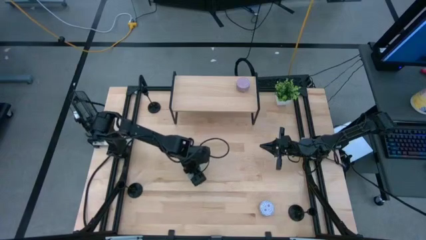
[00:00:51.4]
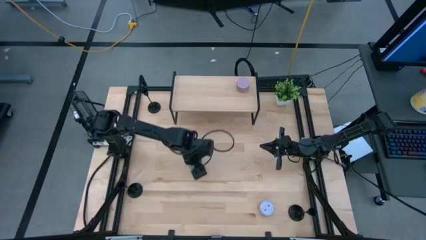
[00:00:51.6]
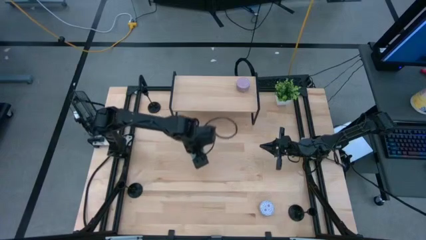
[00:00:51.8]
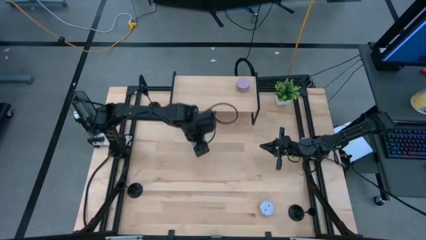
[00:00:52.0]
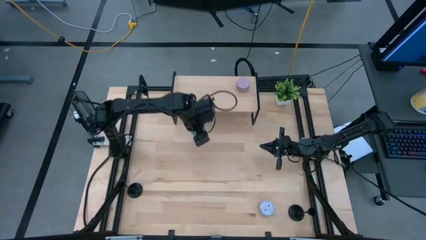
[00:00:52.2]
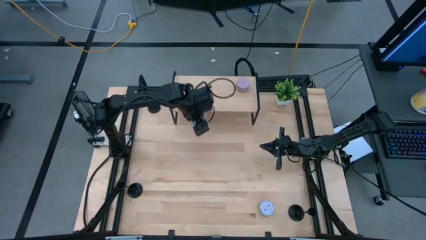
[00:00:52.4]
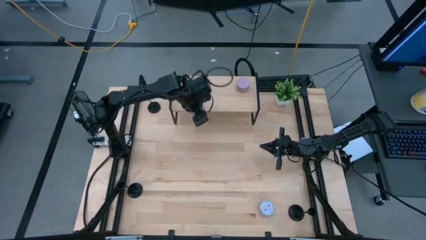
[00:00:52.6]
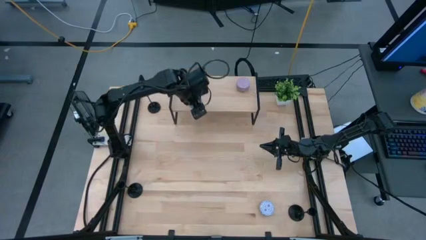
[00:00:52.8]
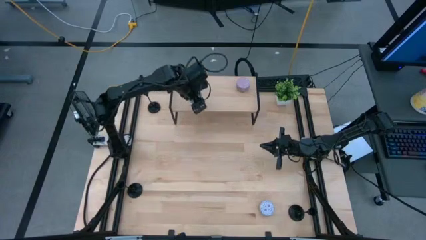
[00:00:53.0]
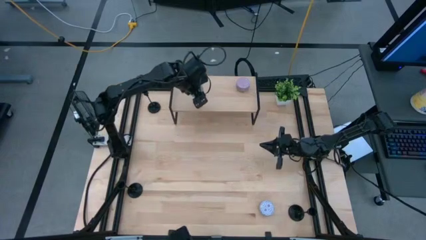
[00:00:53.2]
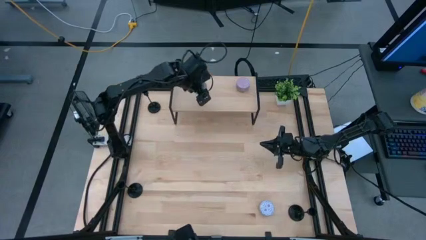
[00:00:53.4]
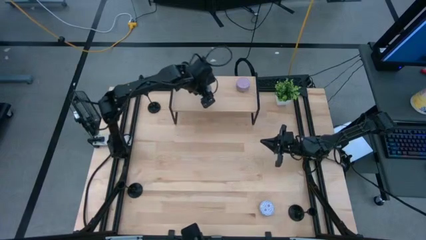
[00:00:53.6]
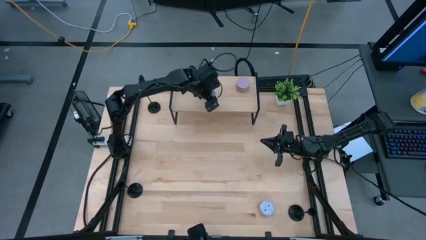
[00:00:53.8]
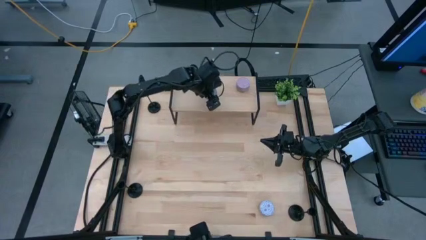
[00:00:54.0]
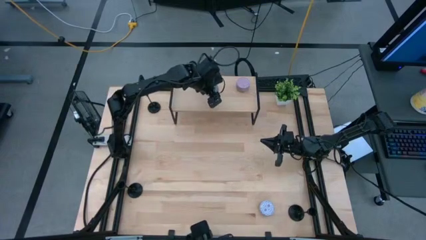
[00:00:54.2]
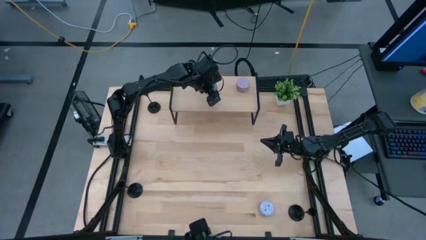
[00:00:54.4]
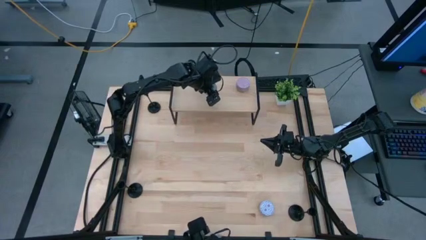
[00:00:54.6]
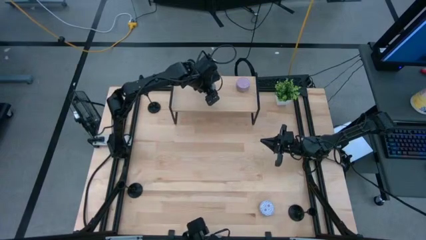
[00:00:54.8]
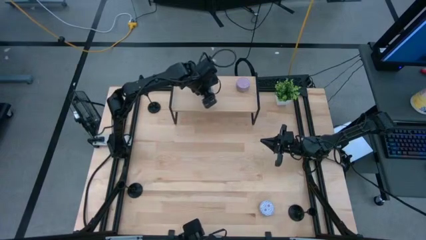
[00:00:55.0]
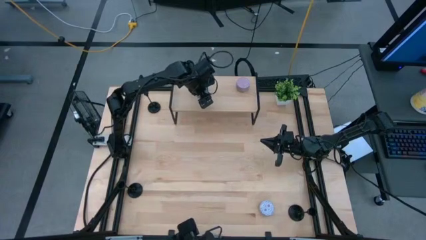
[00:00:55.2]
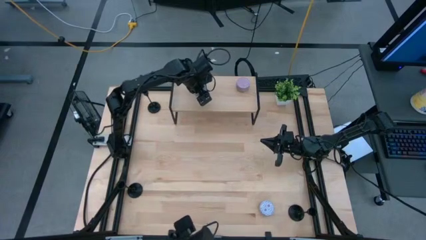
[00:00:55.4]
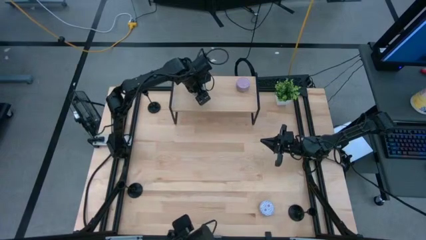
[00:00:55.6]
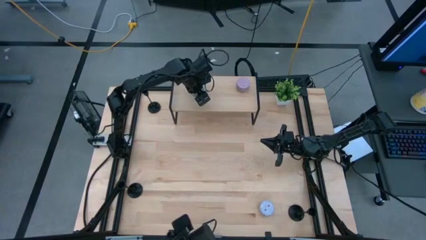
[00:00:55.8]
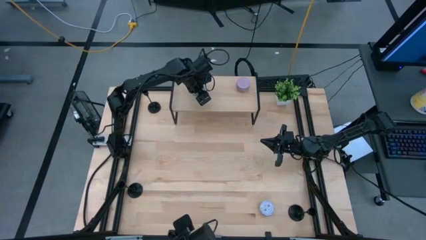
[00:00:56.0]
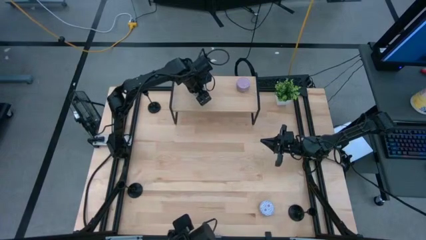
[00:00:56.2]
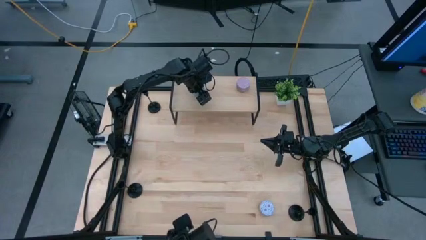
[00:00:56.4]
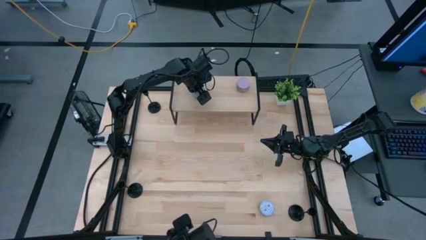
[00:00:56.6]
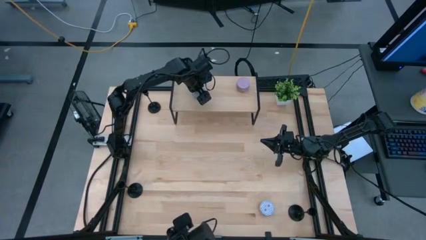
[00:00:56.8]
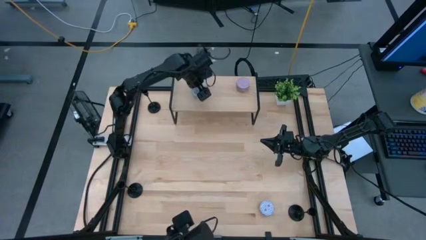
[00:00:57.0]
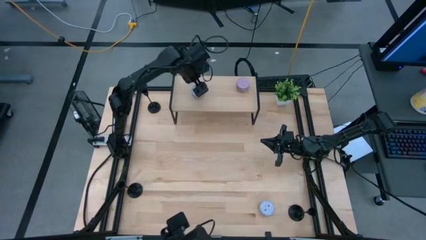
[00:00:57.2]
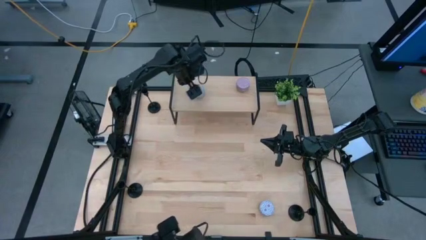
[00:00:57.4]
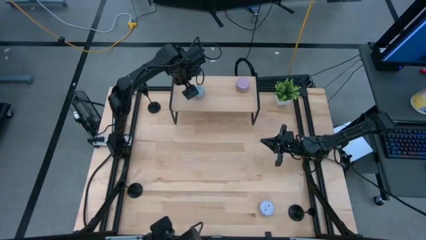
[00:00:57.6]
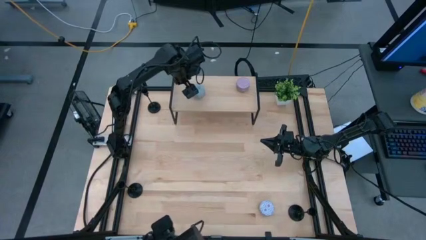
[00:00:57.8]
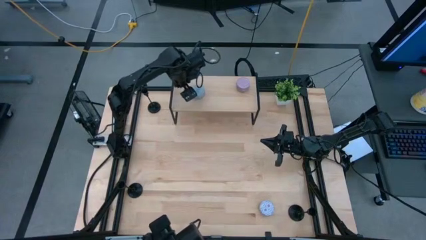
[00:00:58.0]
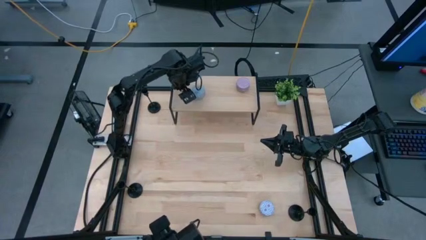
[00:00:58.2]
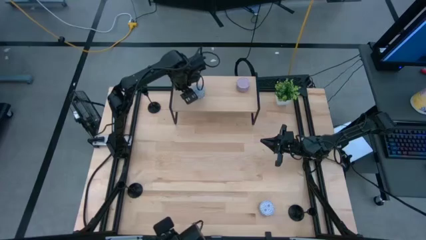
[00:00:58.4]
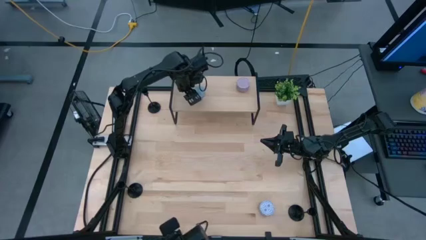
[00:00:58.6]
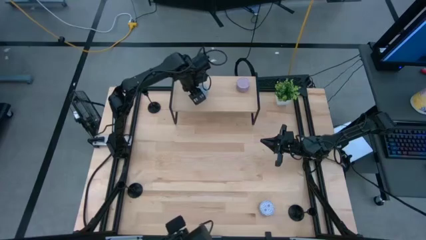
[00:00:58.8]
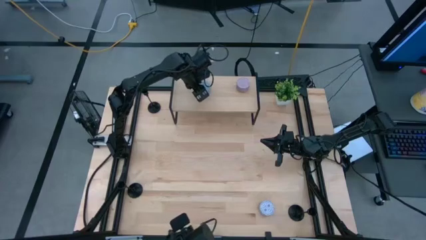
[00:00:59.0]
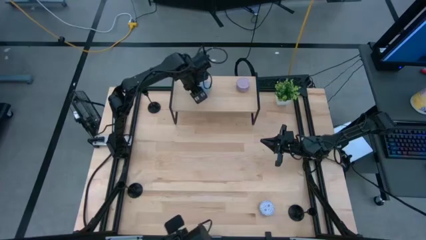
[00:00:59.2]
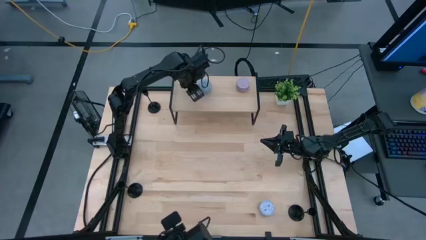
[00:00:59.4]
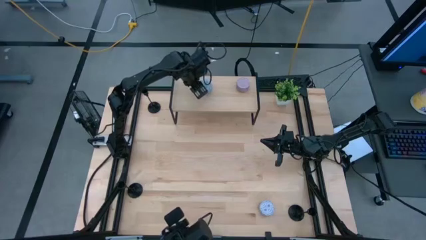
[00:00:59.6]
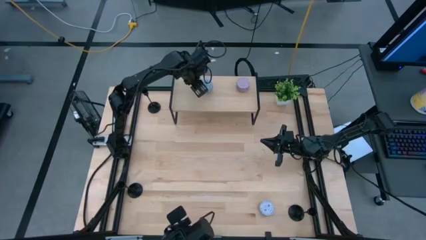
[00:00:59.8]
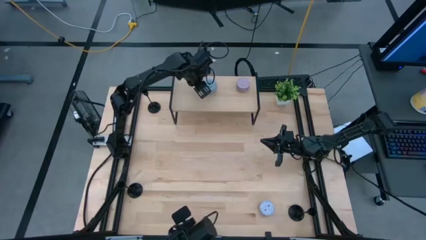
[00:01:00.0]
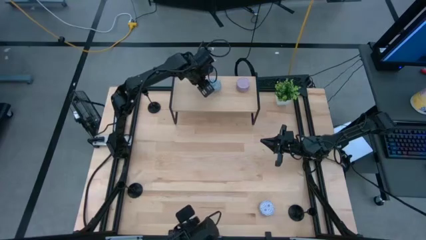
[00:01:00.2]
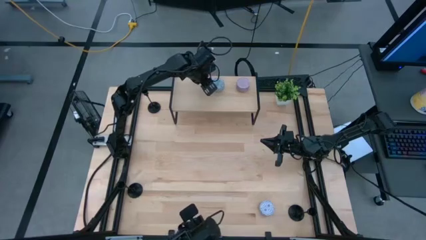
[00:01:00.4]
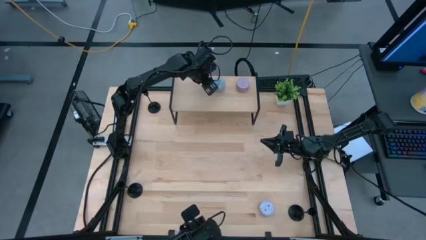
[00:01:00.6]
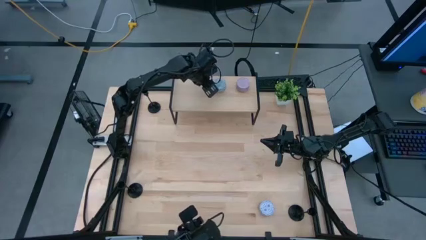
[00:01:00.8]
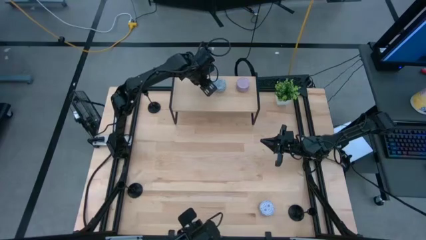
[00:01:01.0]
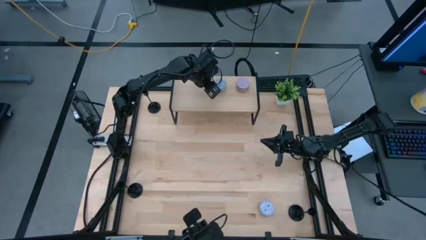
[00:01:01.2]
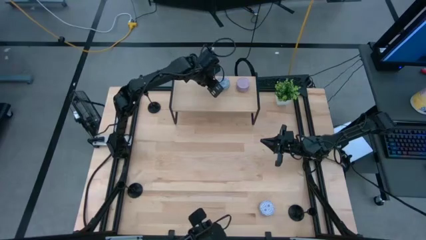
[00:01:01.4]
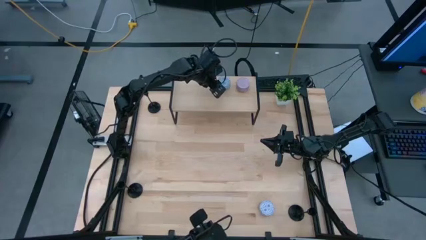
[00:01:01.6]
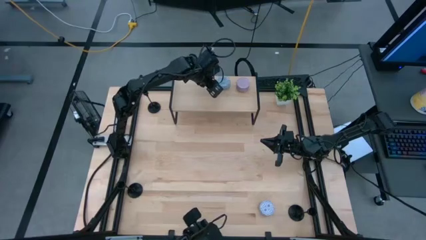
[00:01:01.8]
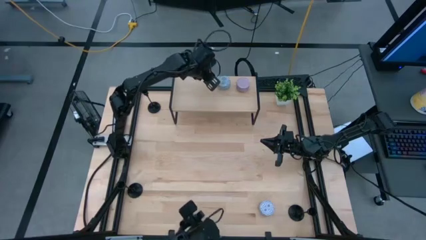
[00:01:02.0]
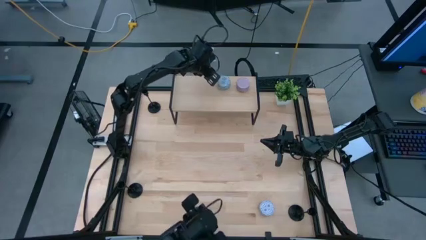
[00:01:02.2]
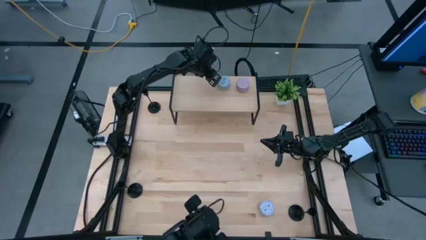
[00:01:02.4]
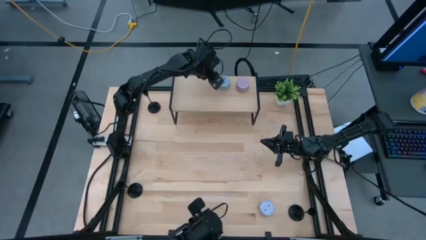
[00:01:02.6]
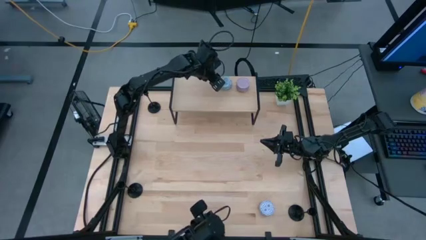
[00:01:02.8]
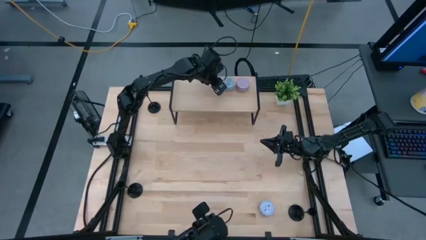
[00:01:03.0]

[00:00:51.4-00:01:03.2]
Task: Pick & Place candle stick holders
Put the green scented candle on the shelf
